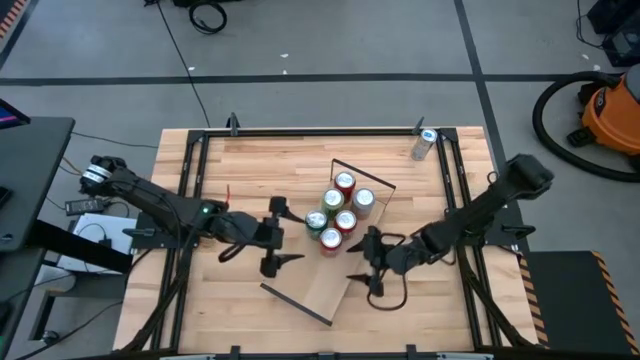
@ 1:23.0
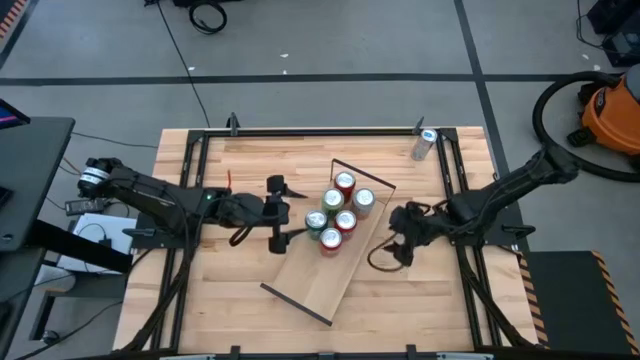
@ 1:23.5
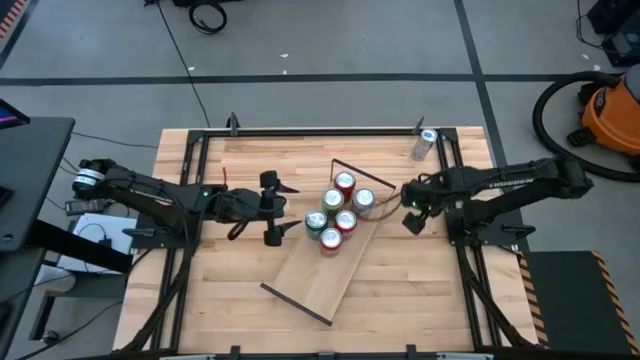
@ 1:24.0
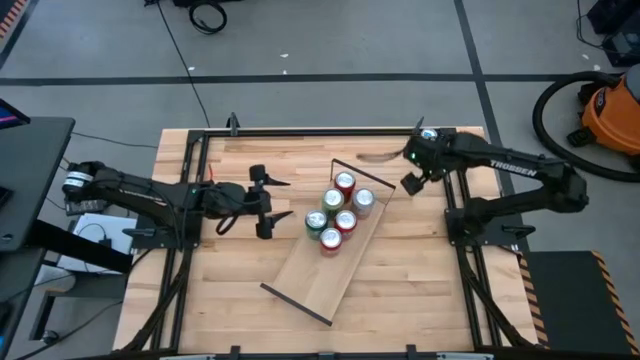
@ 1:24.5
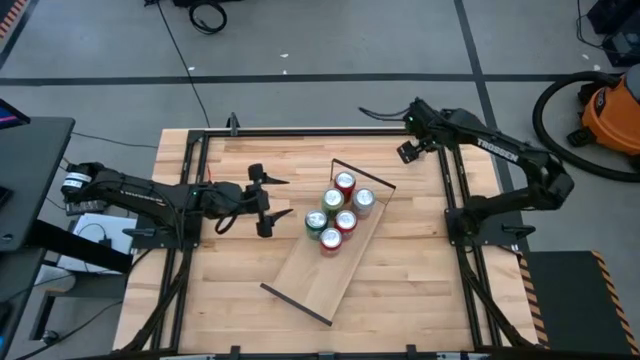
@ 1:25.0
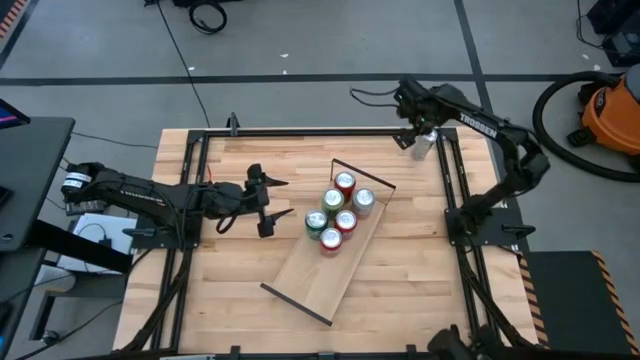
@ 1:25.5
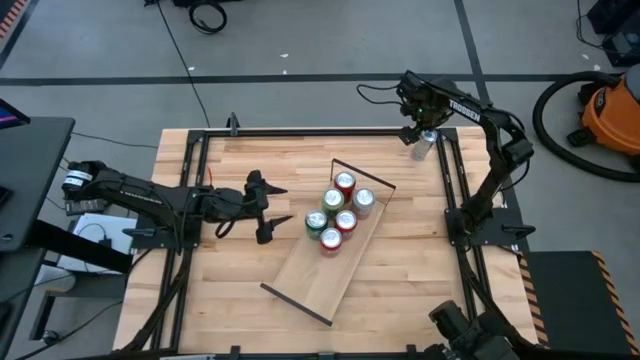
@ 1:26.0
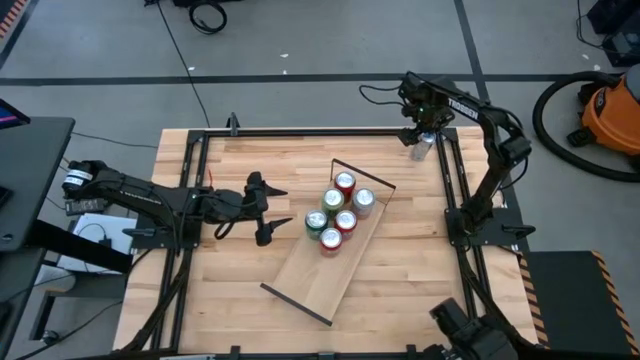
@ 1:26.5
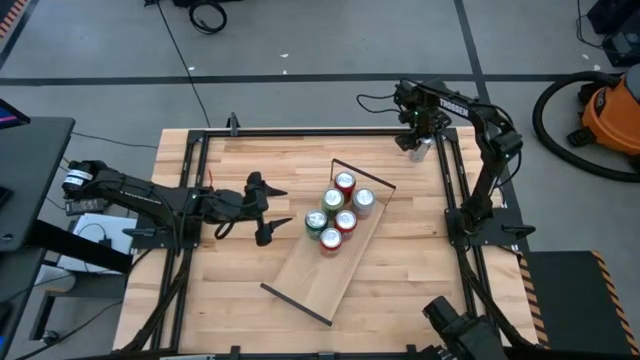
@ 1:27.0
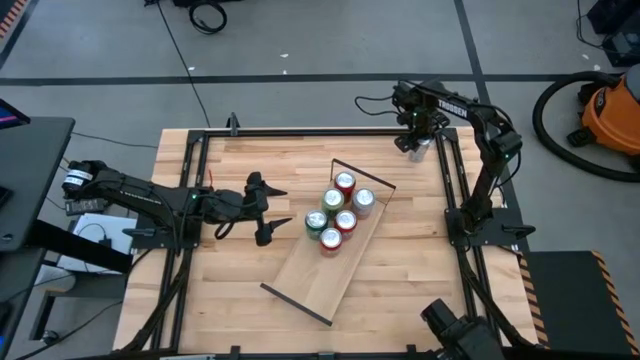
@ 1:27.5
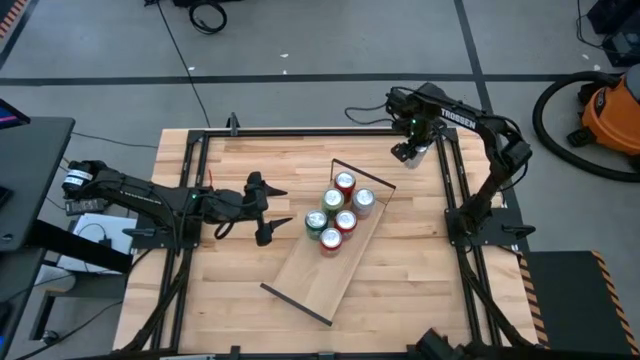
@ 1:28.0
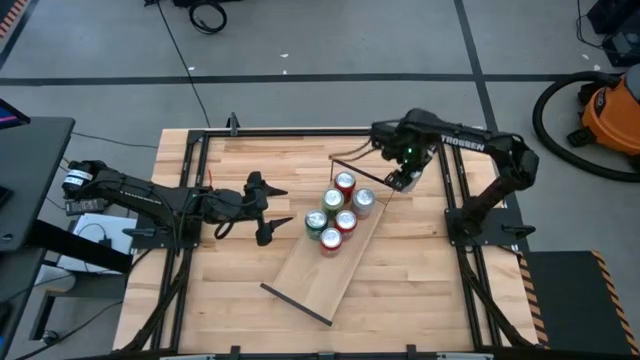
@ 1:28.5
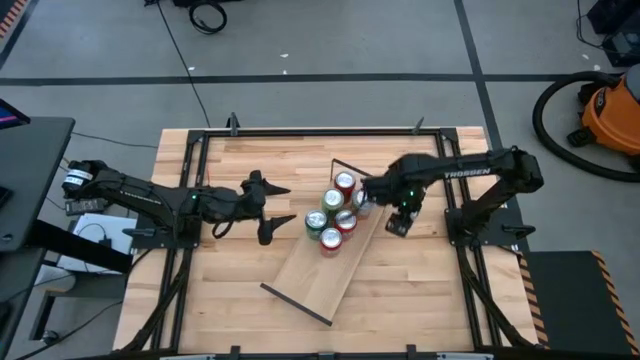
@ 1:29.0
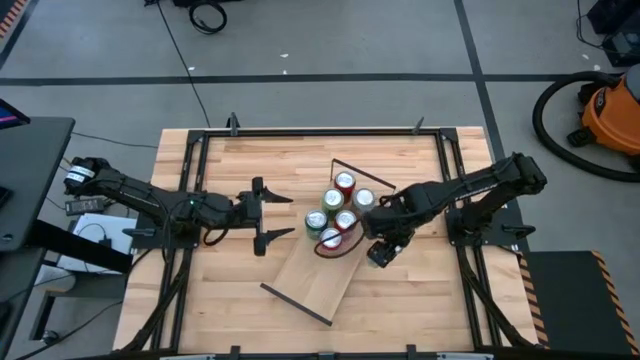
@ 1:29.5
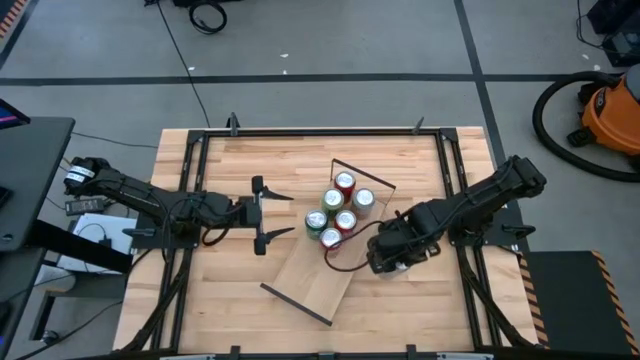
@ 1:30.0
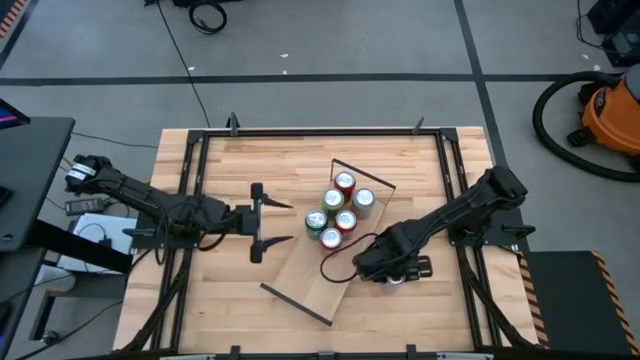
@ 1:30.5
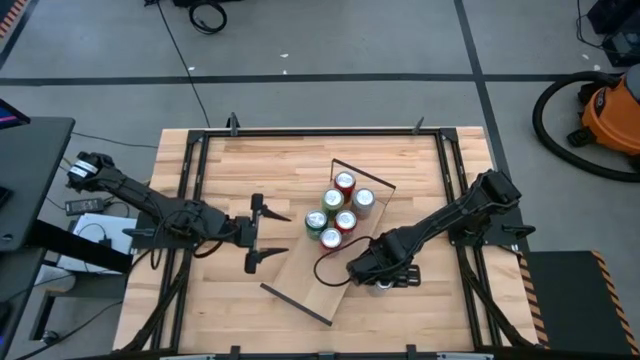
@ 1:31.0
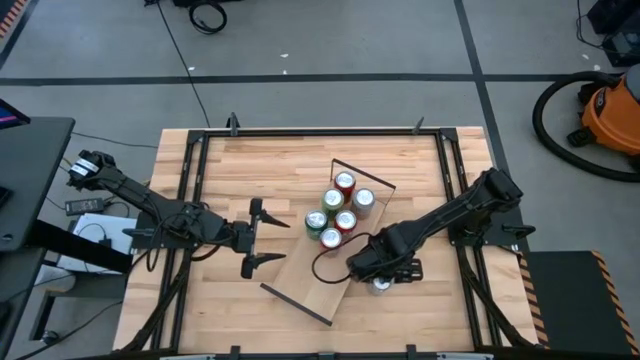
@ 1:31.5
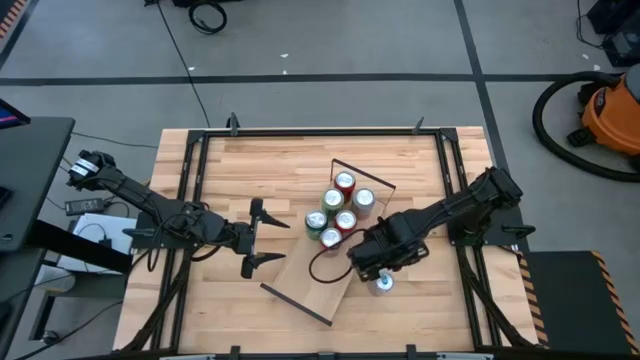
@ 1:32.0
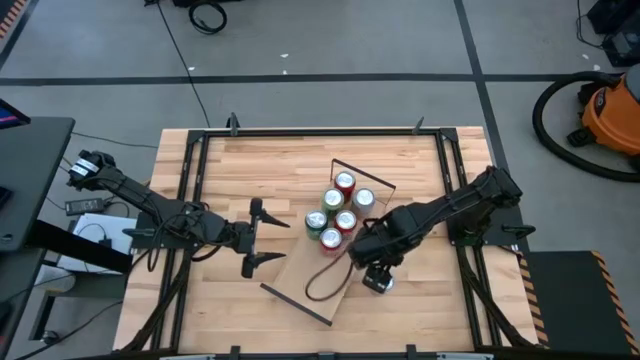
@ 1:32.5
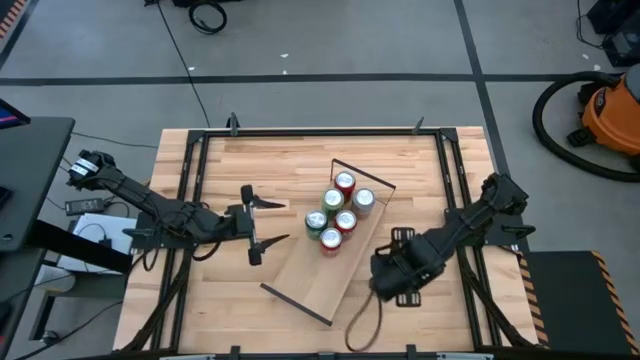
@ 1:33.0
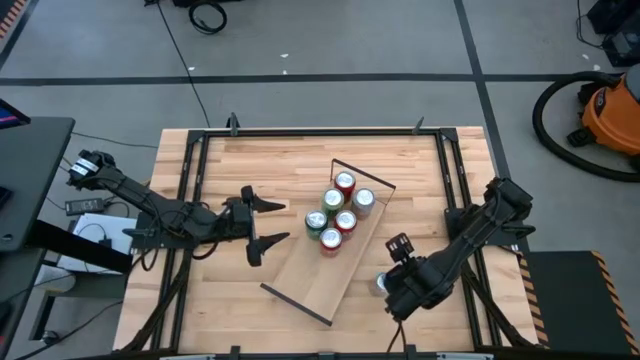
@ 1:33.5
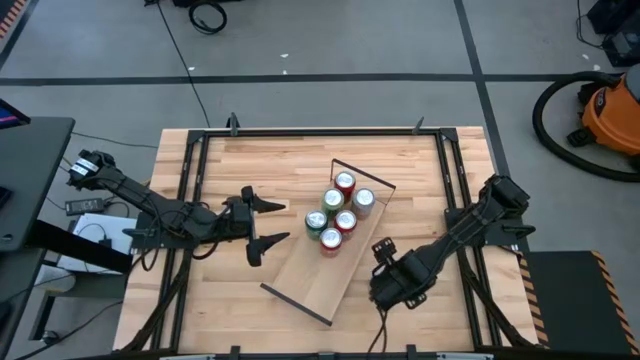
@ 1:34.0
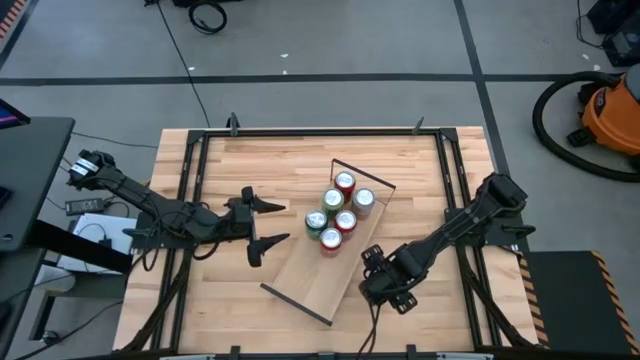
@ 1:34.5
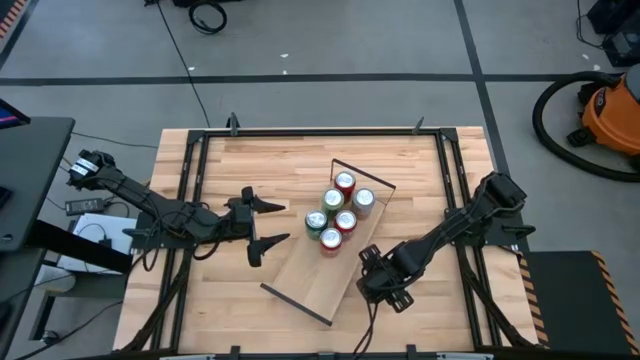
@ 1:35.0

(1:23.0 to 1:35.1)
Task: Place canned beverage on shelf
Put the blue soda can on the shelf

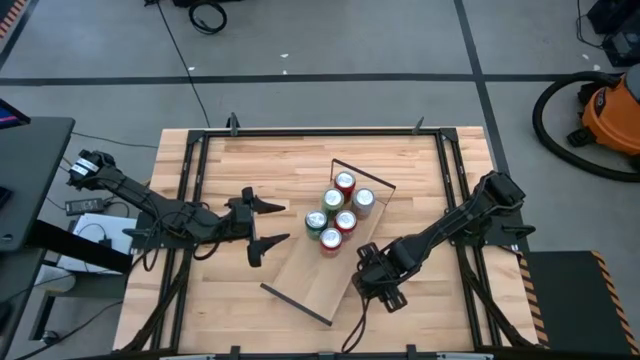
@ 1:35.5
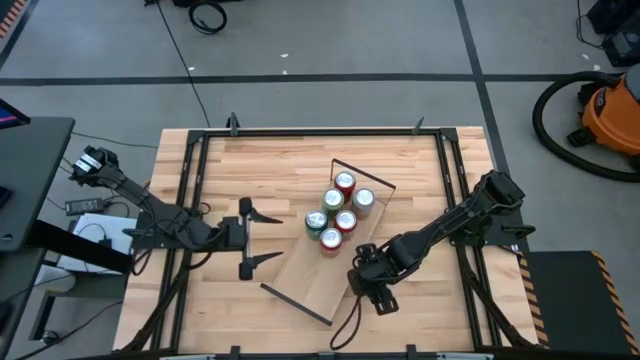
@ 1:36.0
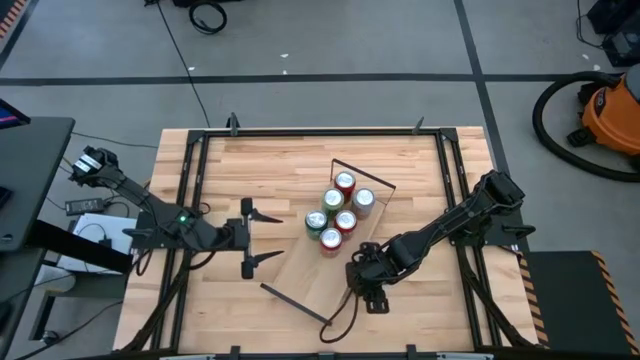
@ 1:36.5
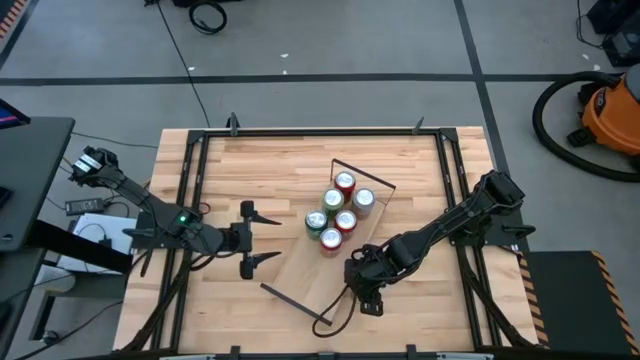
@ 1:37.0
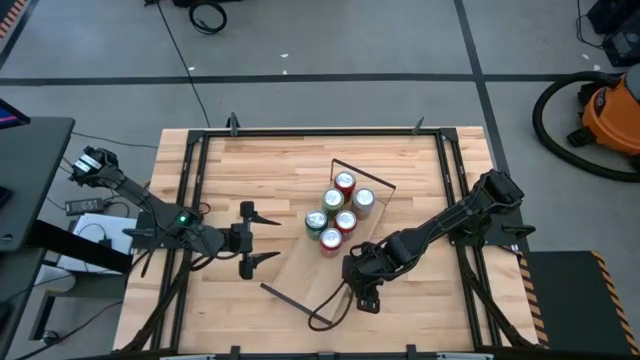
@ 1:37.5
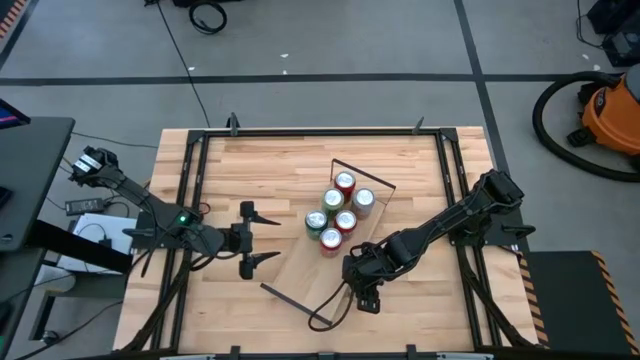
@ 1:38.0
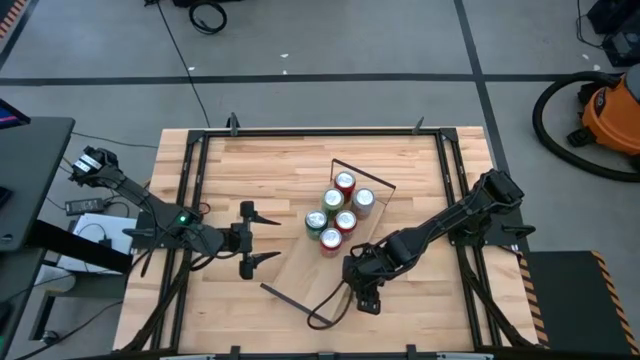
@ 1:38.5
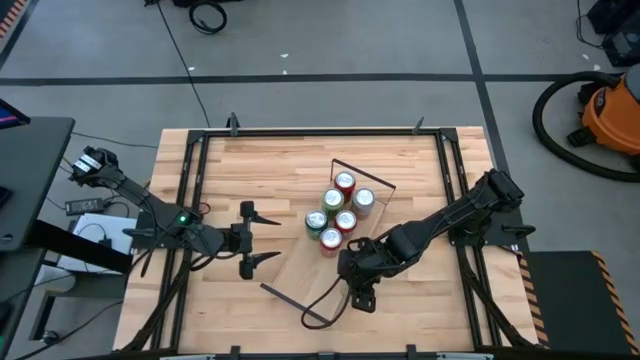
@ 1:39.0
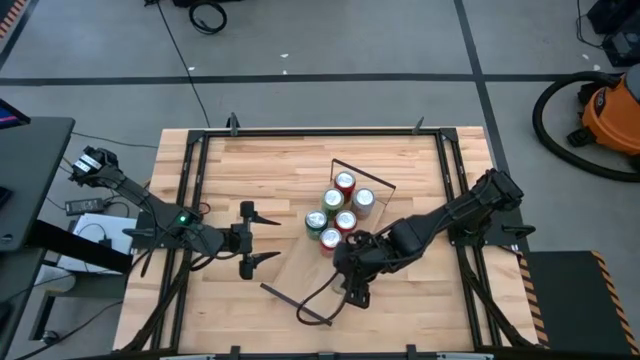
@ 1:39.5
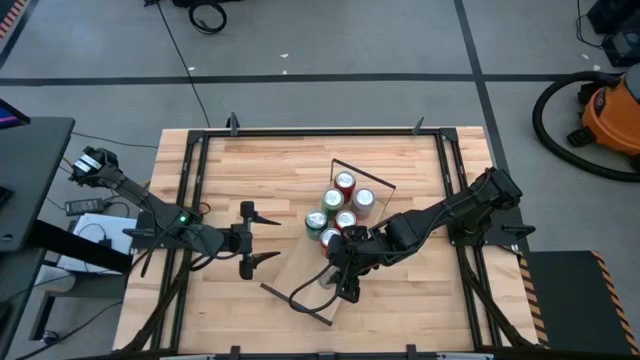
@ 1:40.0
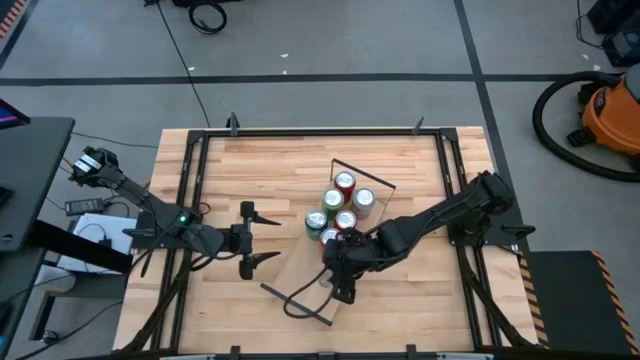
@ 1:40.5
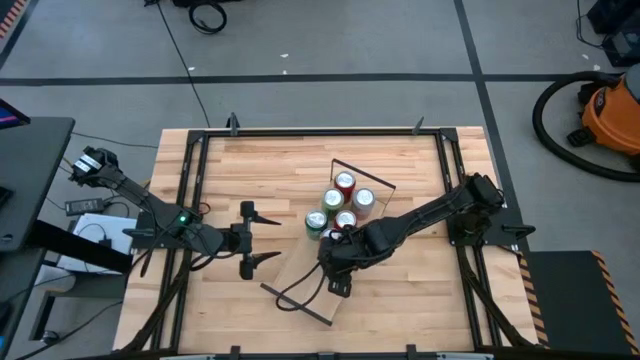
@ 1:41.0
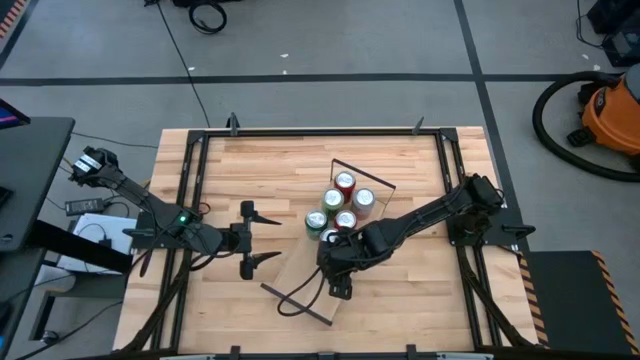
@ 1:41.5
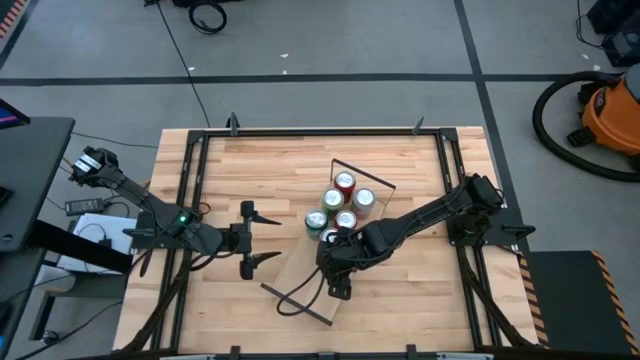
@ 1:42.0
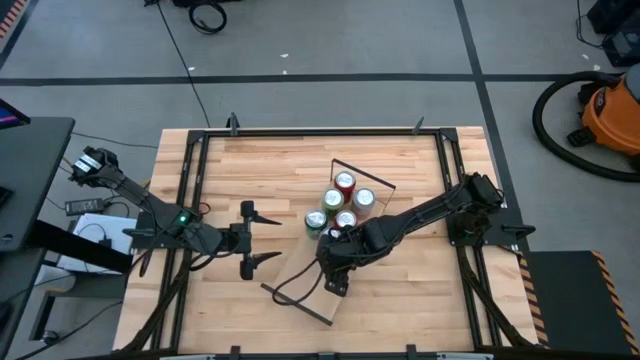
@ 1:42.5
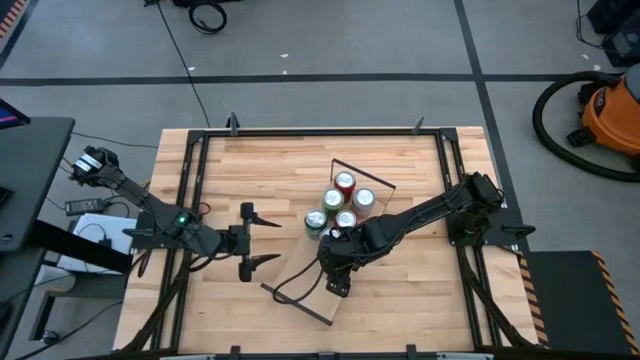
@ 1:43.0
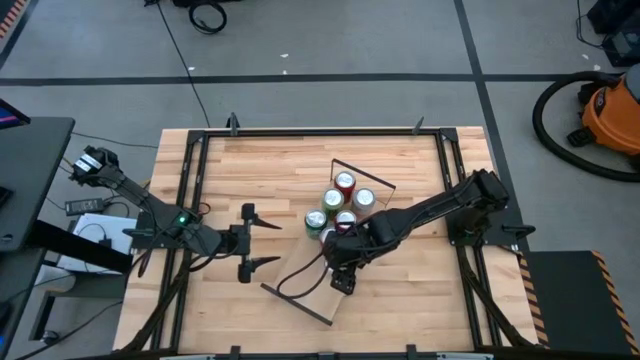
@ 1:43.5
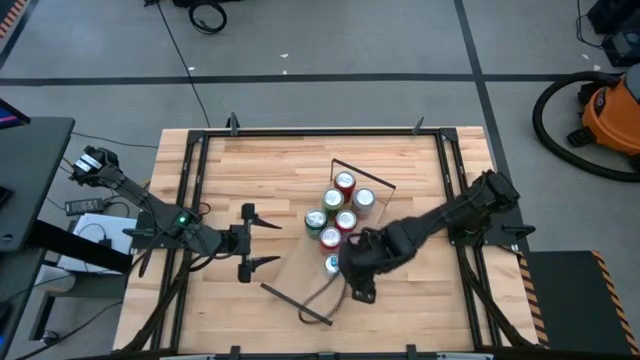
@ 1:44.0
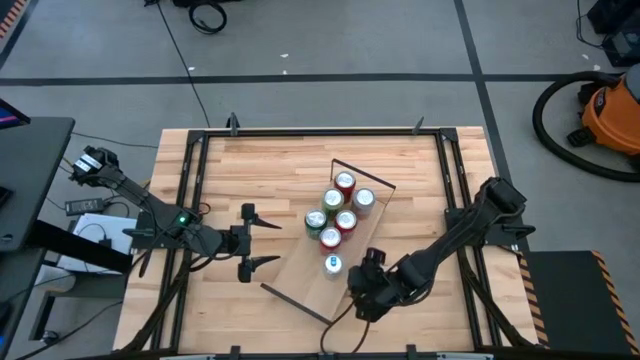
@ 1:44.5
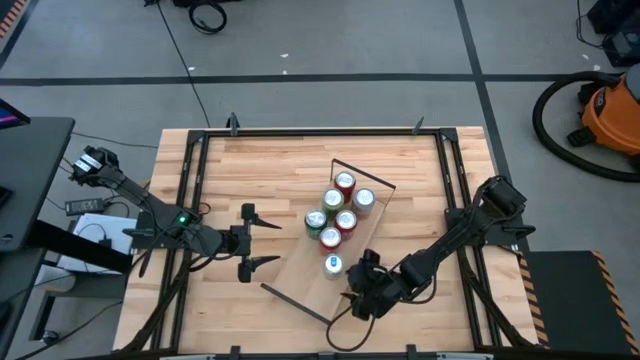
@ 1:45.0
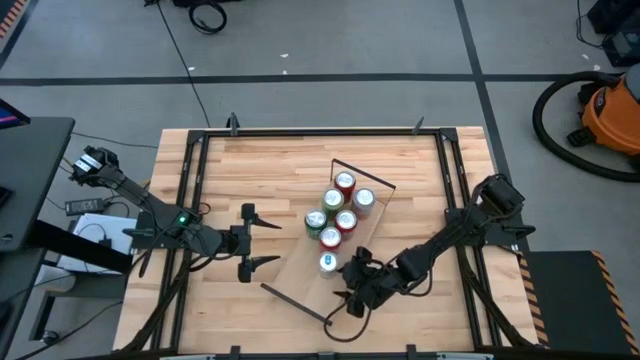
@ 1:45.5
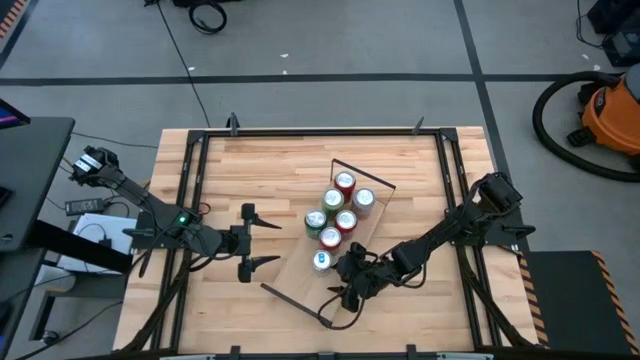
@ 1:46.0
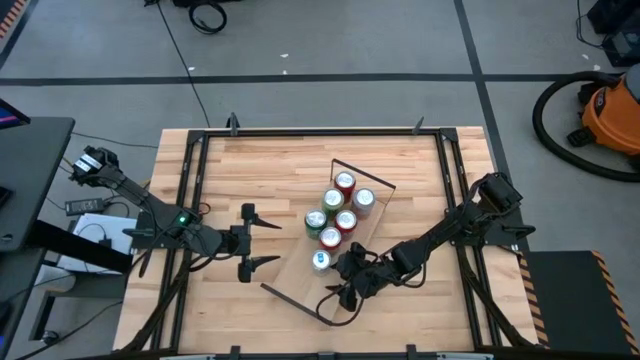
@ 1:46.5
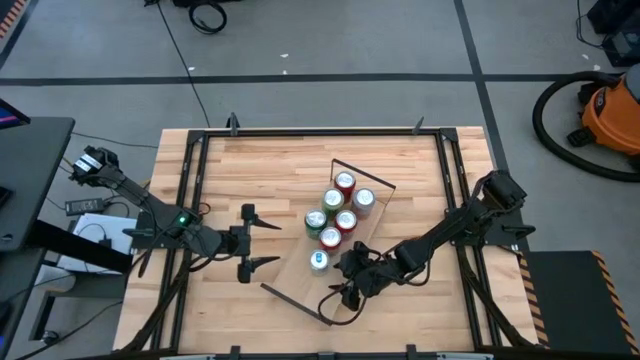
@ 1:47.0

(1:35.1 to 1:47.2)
Put the blue soda can on the shelf
